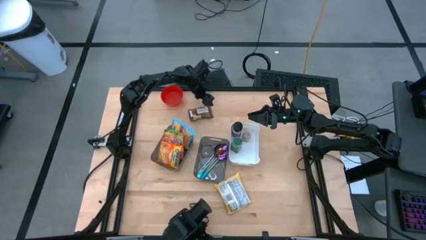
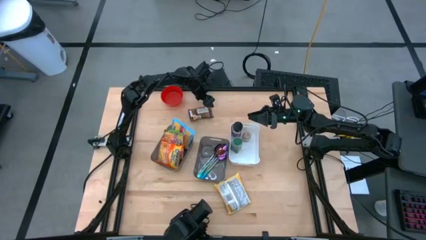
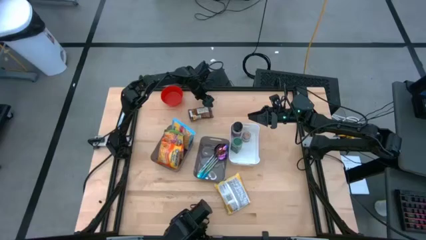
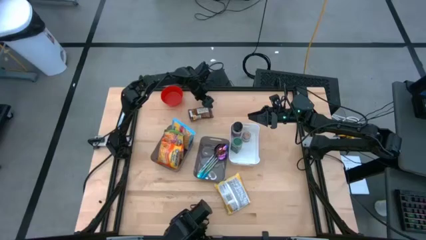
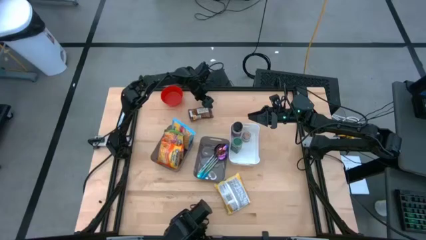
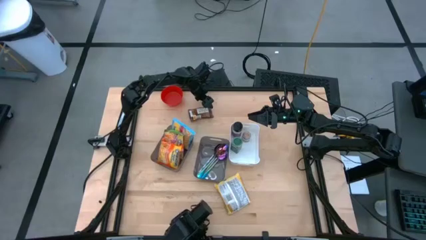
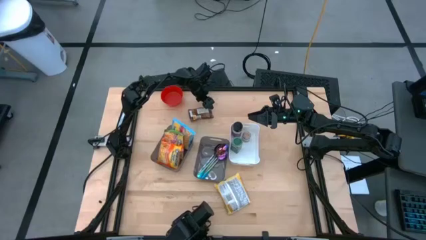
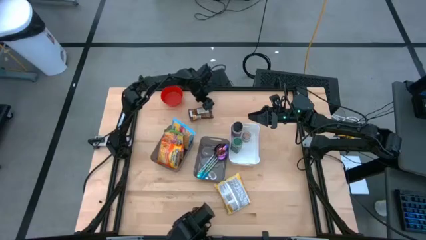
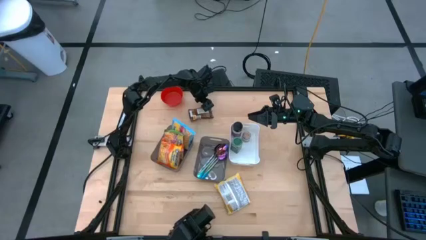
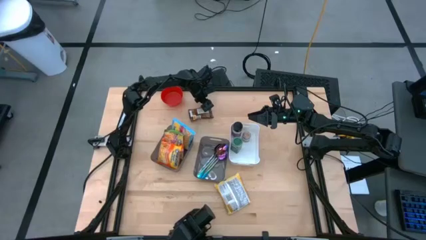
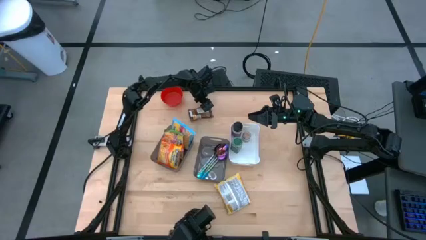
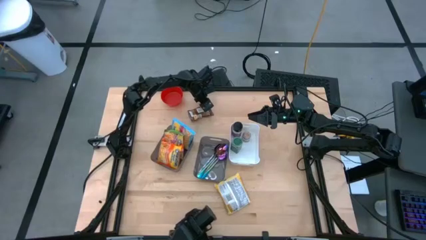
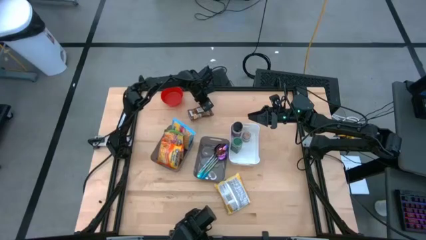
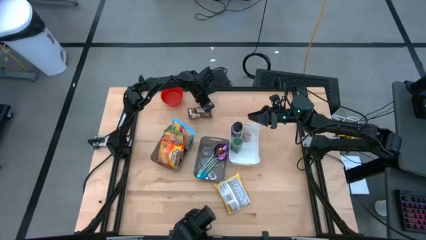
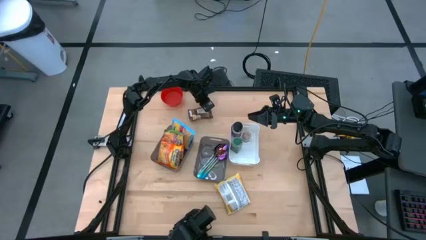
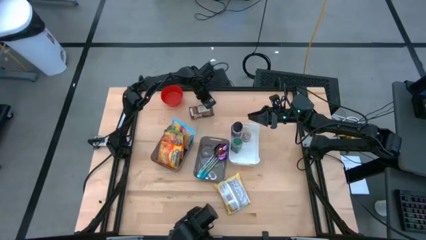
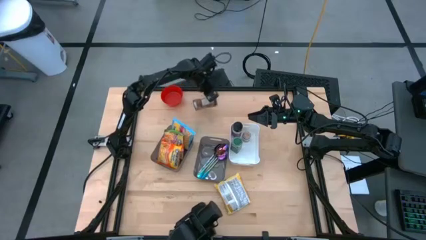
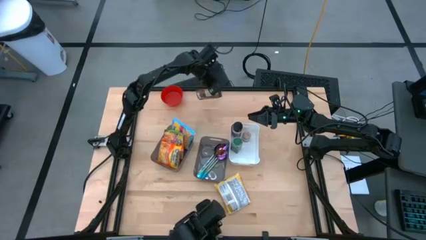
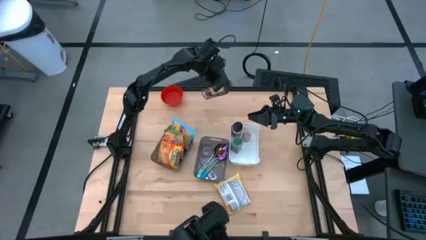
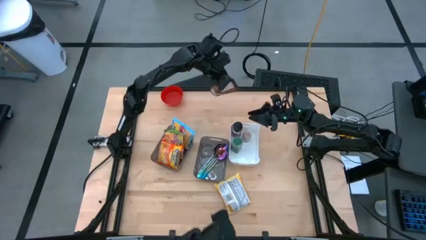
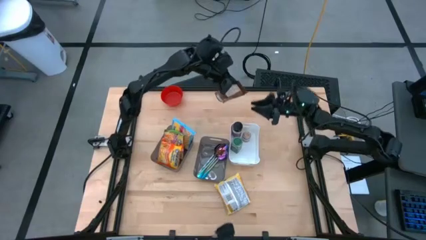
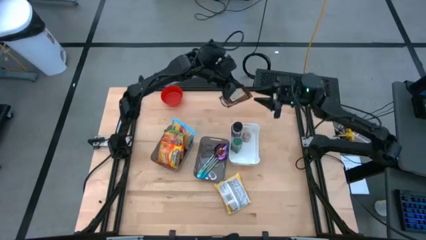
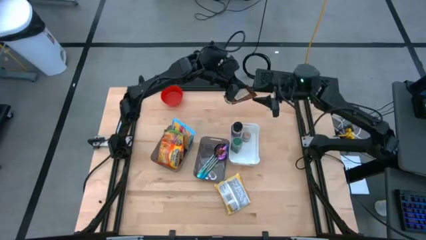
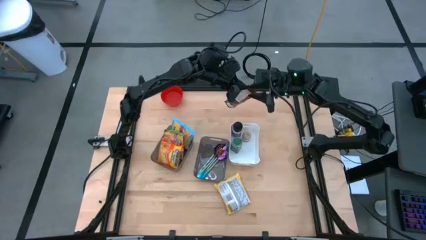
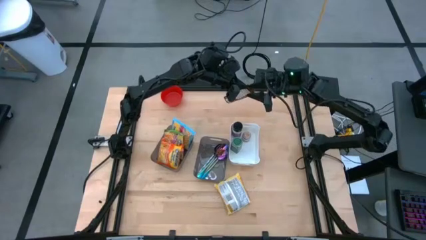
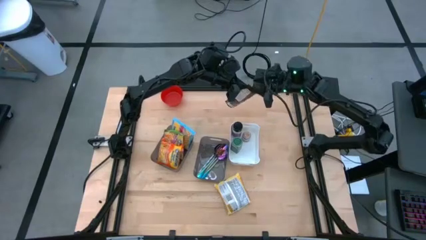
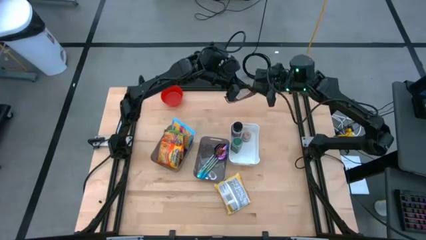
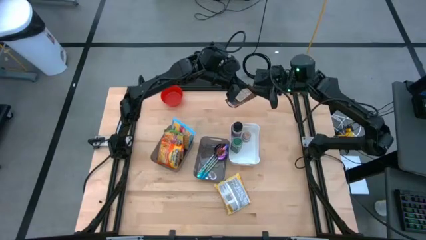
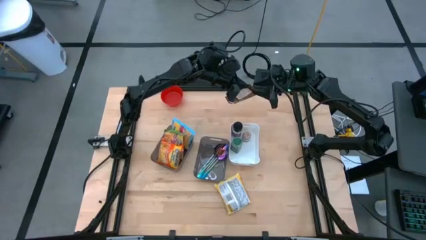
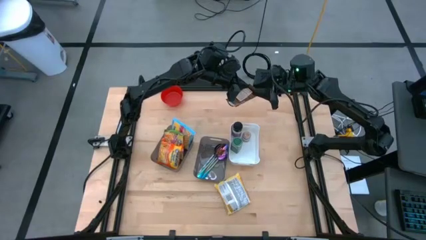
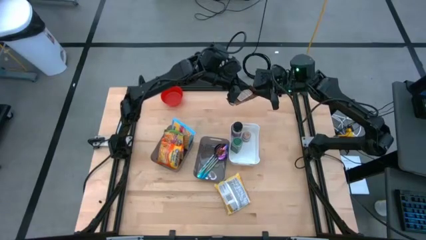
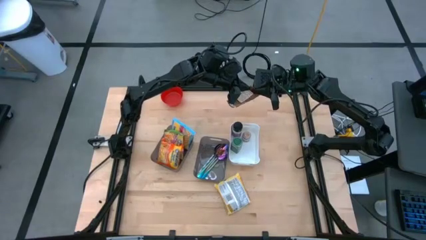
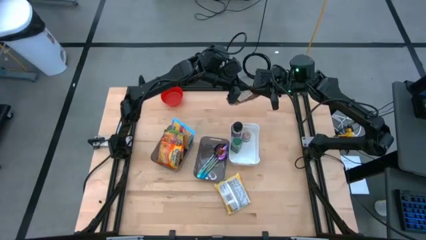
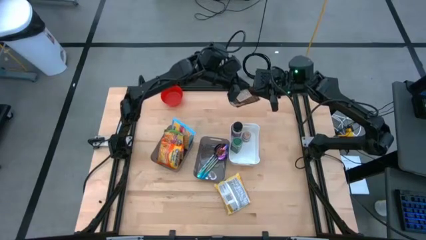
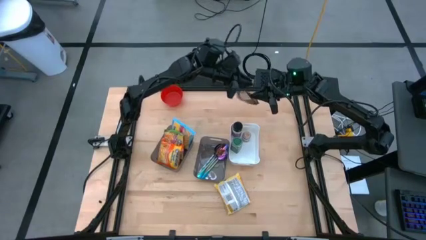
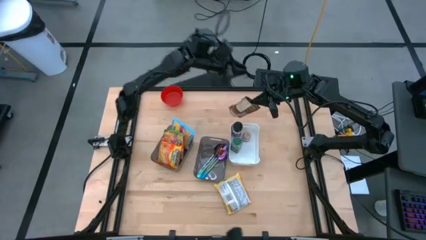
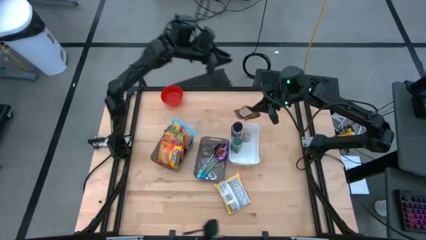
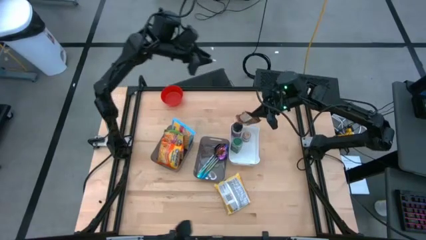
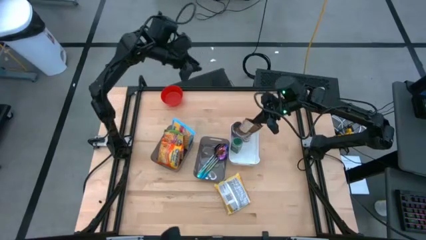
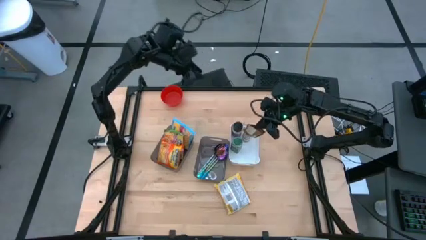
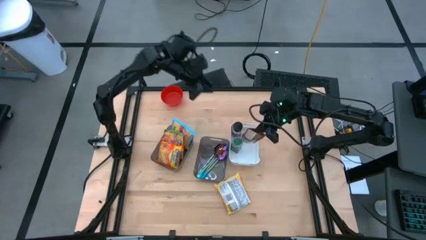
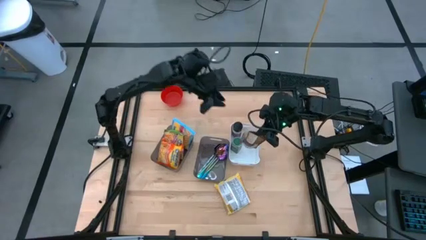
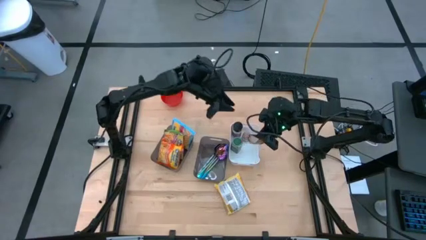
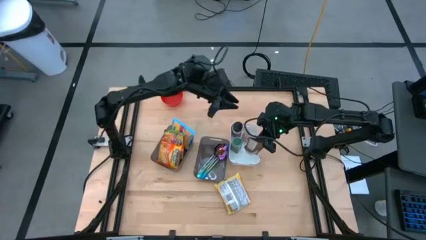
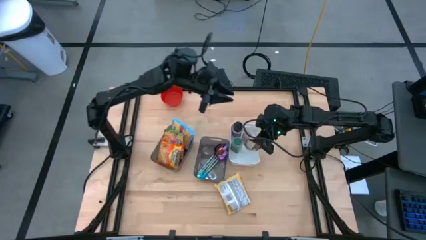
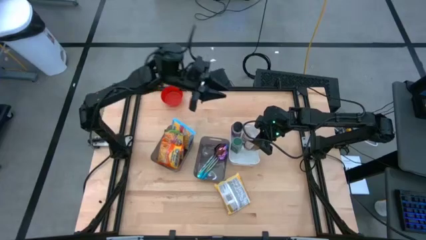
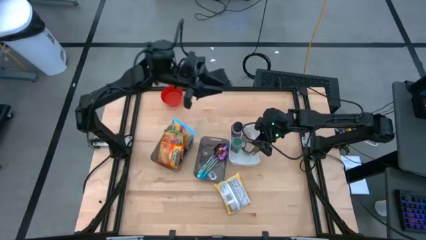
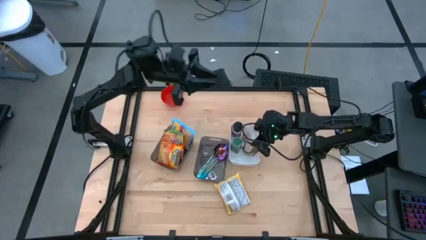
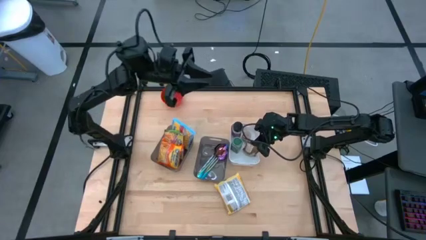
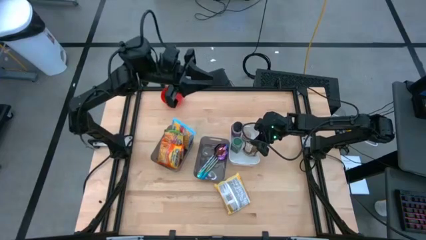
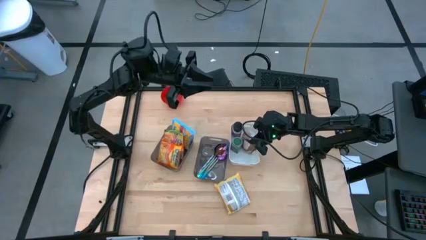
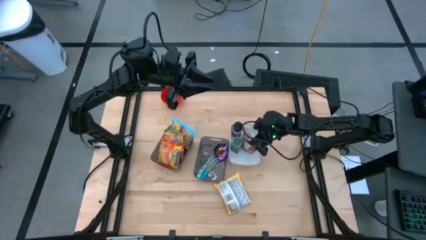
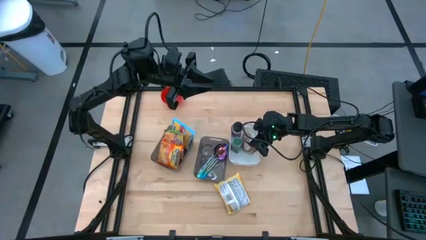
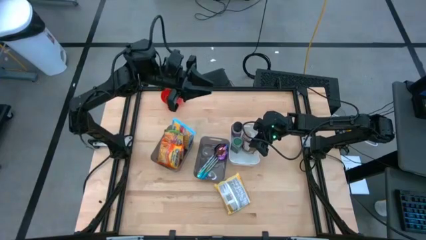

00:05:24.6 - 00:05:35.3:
Task: Pick & Place Food Item
Put the orange pack into the white bin

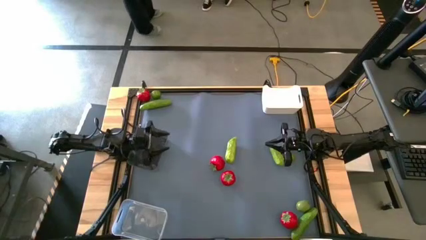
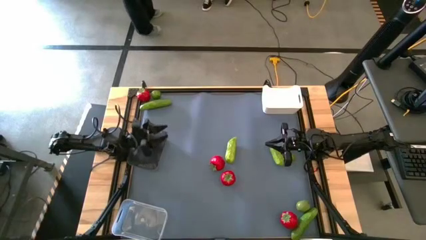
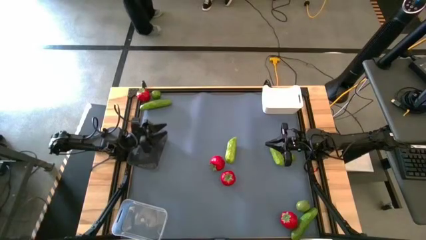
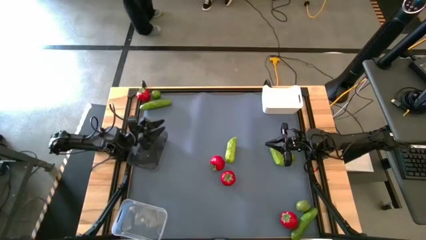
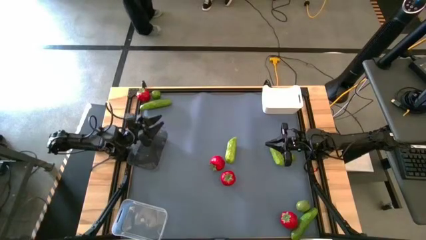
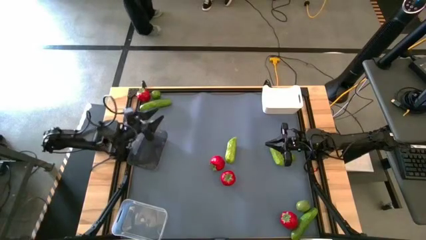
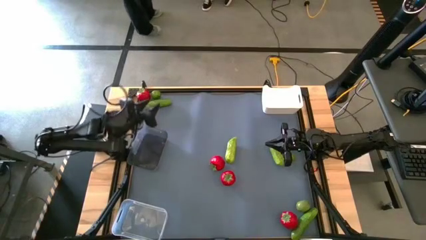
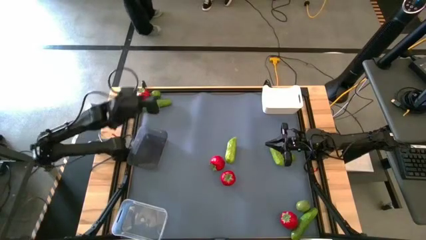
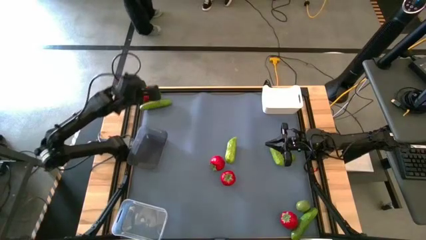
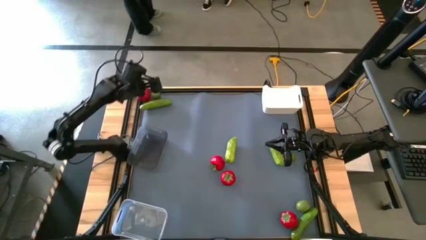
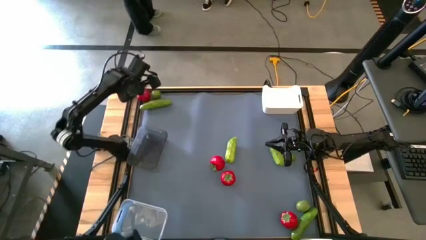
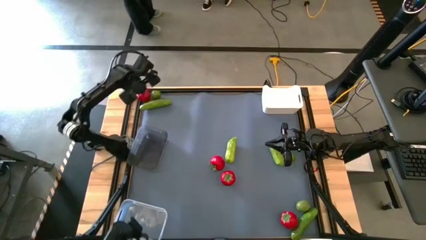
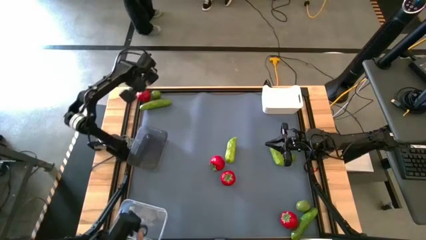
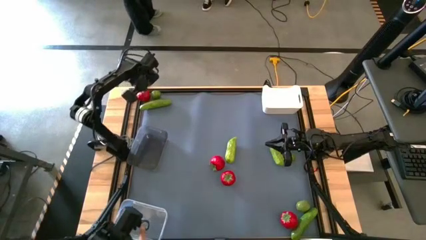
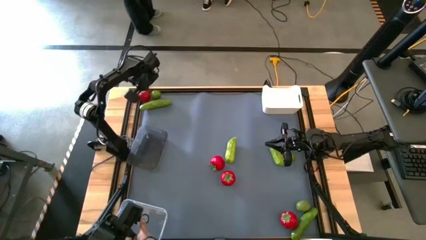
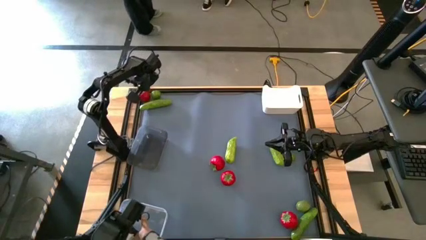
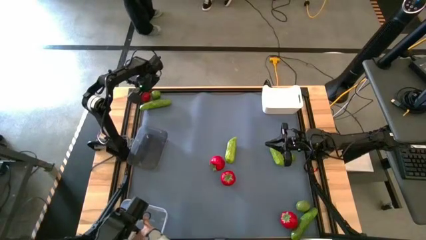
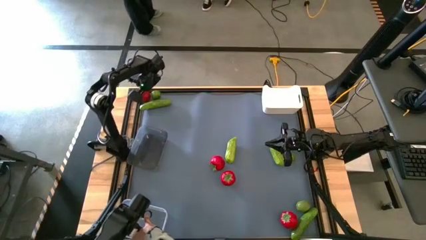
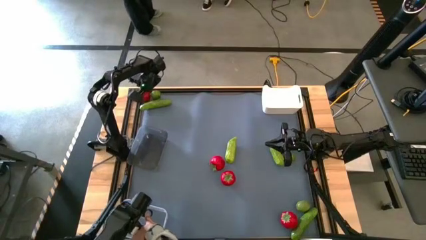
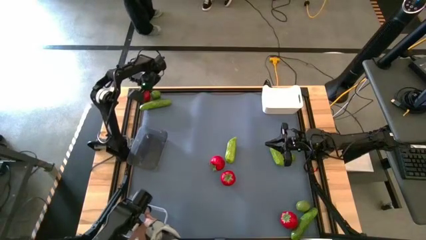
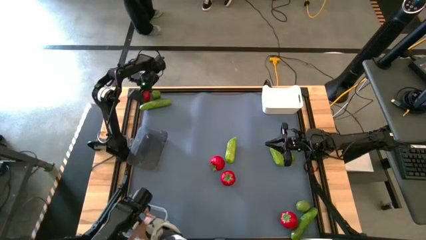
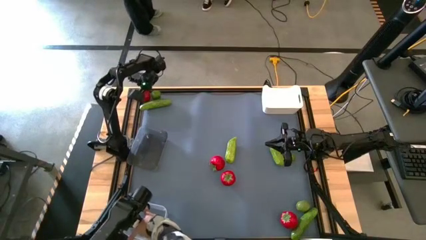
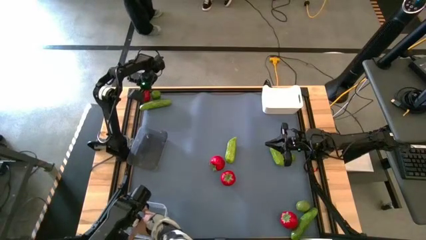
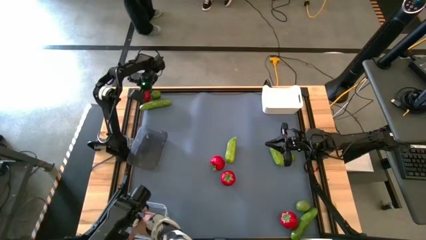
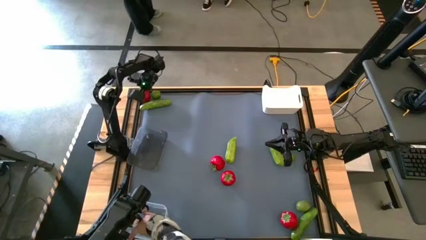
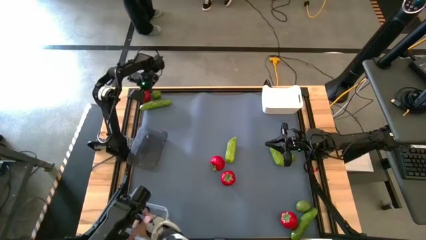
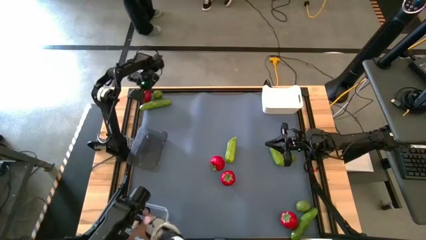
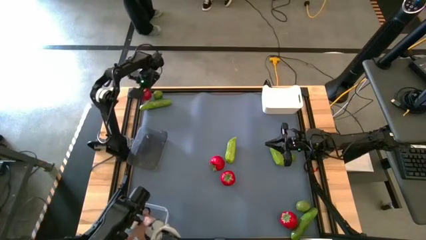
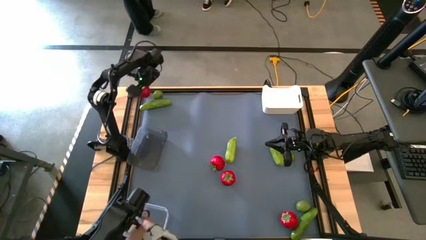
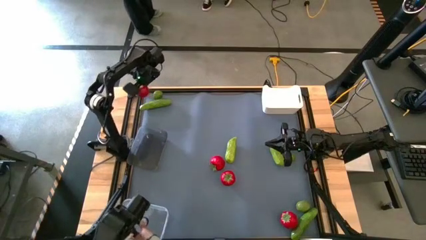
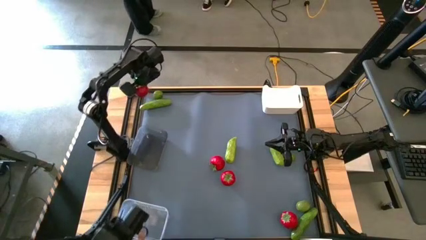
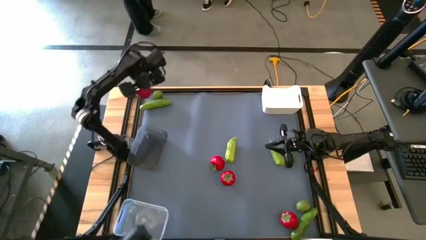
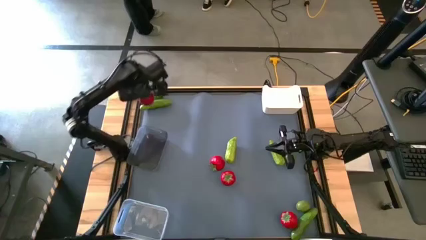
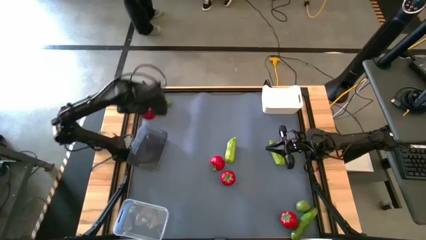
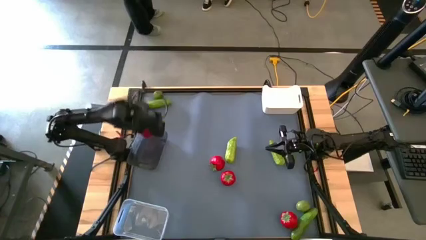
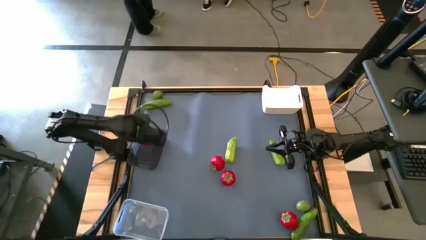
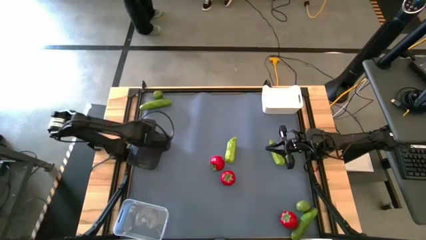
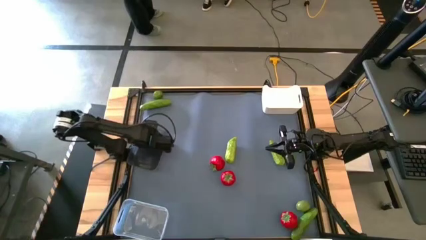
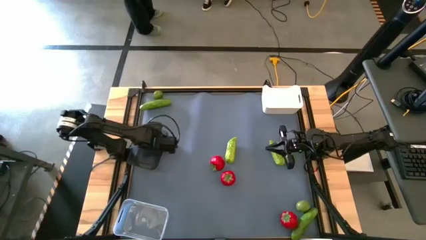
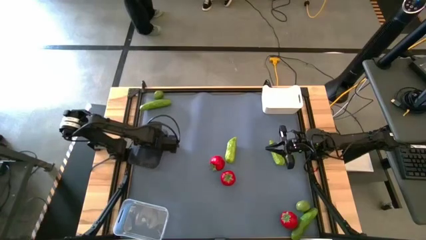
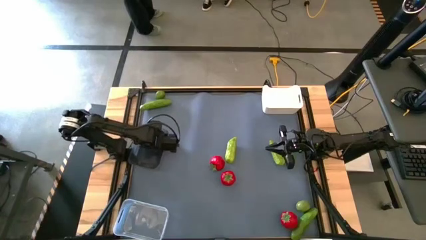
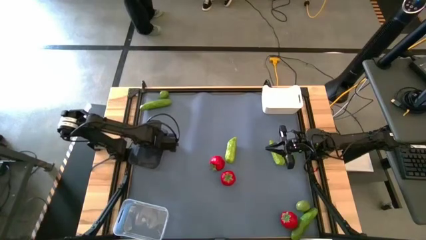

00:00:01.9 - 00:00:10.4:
Task: Sort produce into baskets
Put the top left tomato into the black transparent bin
